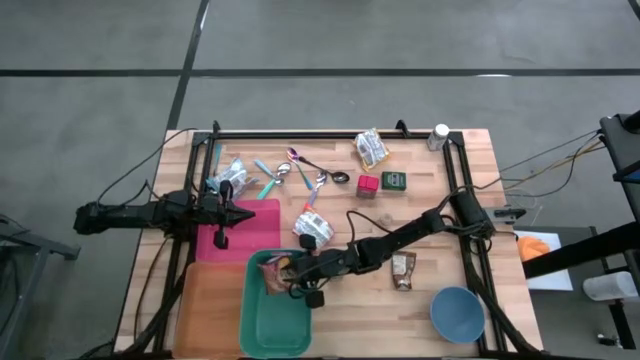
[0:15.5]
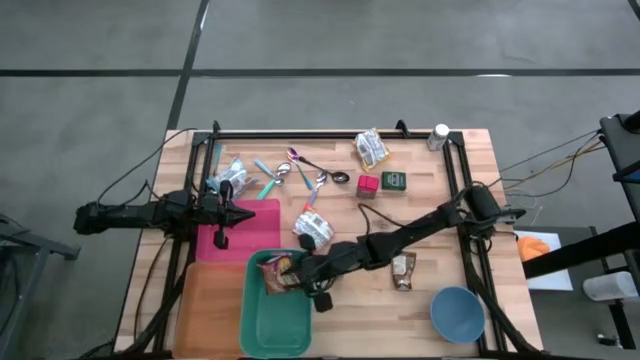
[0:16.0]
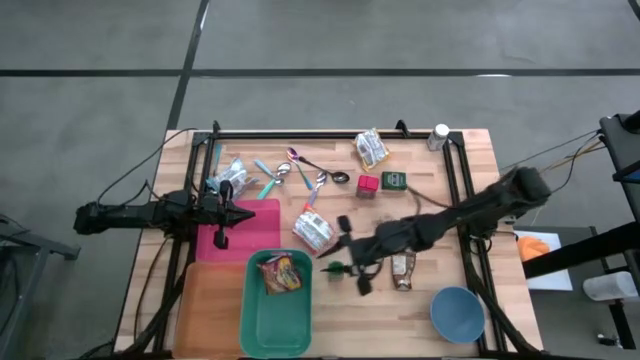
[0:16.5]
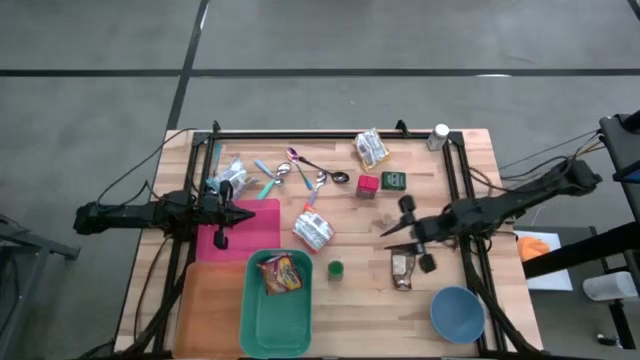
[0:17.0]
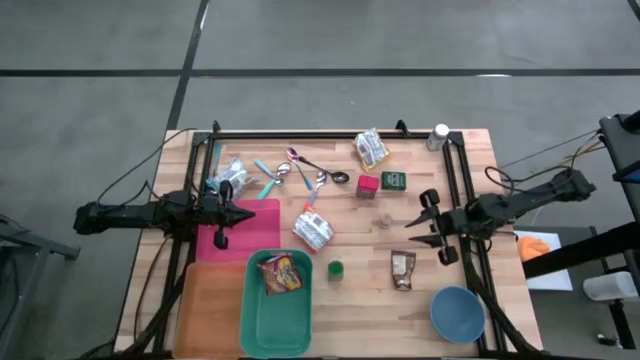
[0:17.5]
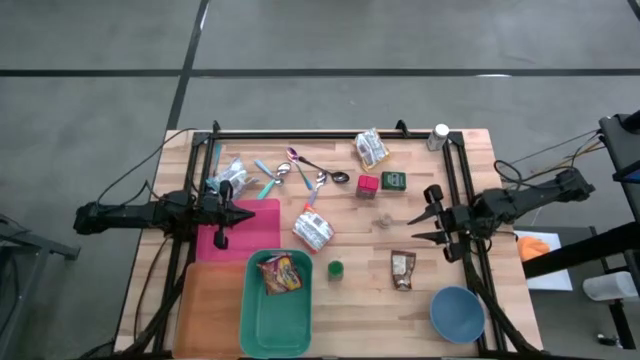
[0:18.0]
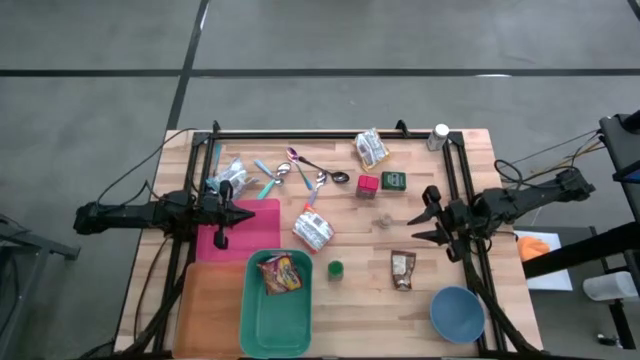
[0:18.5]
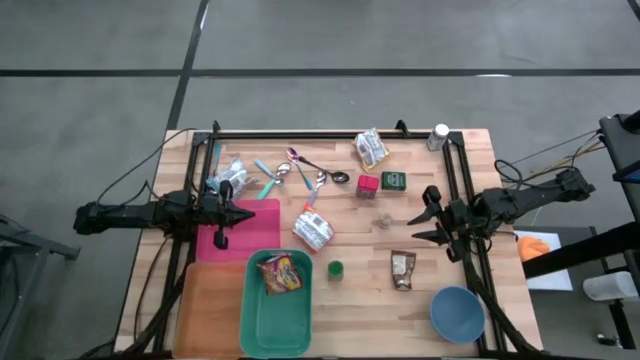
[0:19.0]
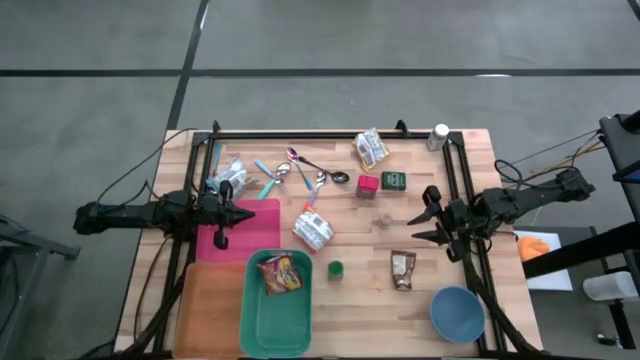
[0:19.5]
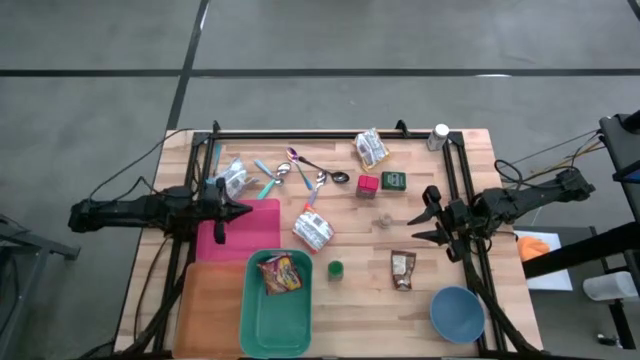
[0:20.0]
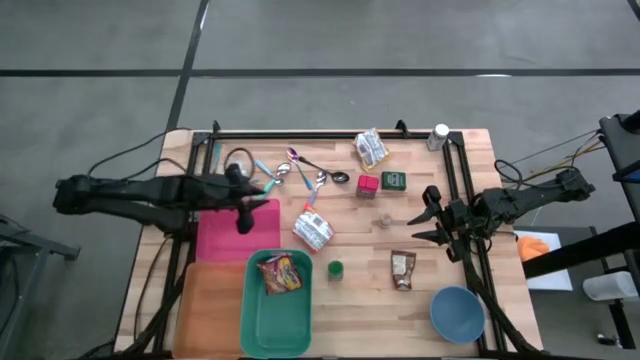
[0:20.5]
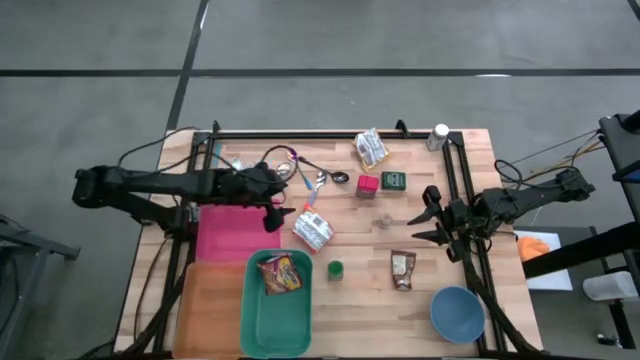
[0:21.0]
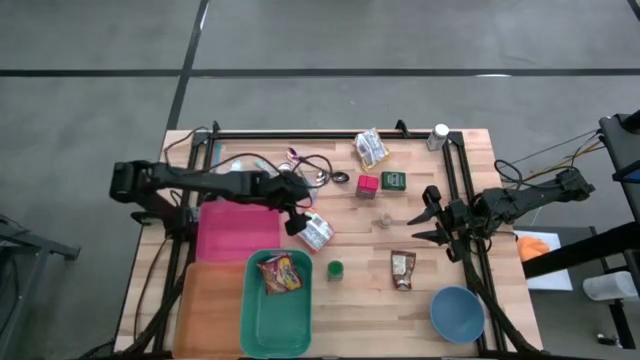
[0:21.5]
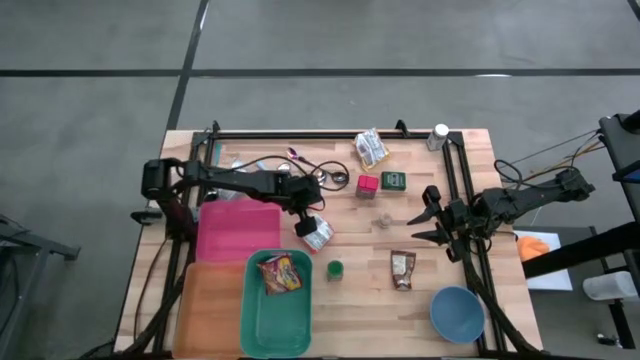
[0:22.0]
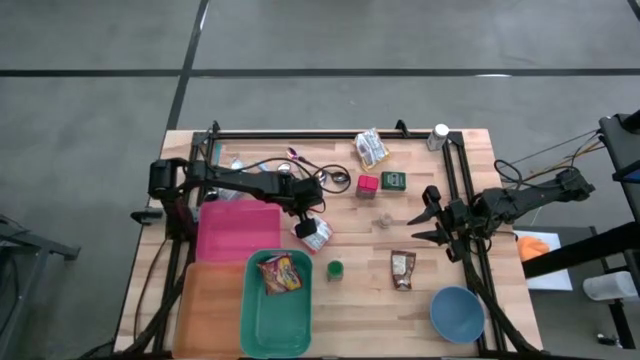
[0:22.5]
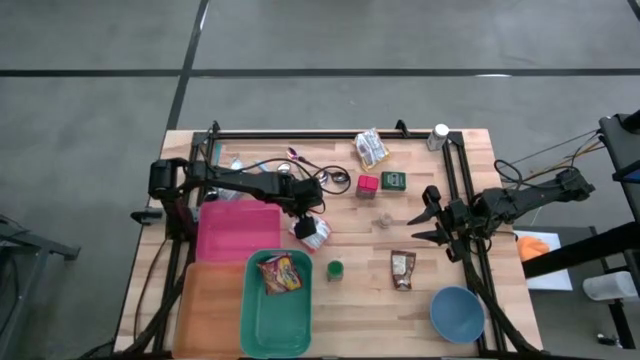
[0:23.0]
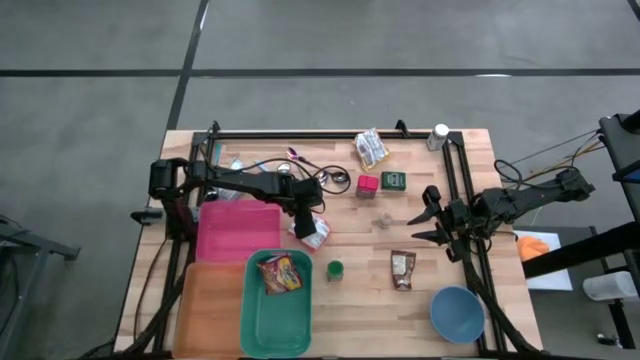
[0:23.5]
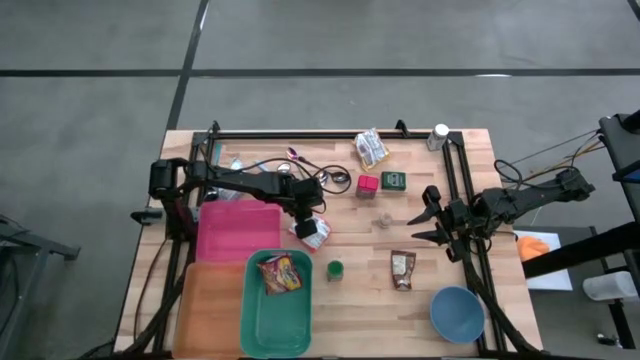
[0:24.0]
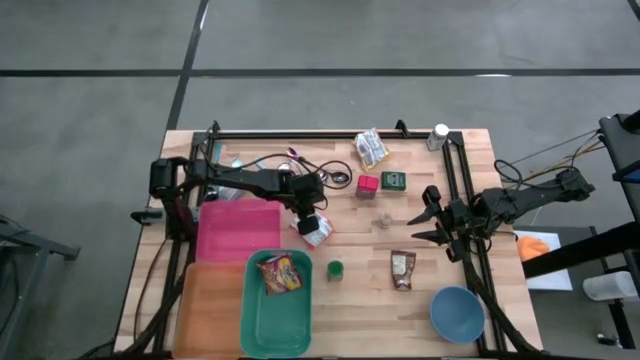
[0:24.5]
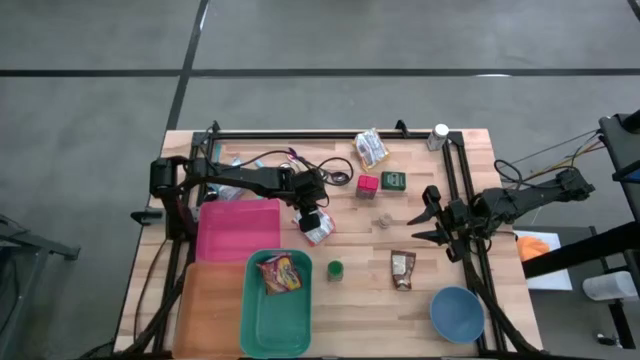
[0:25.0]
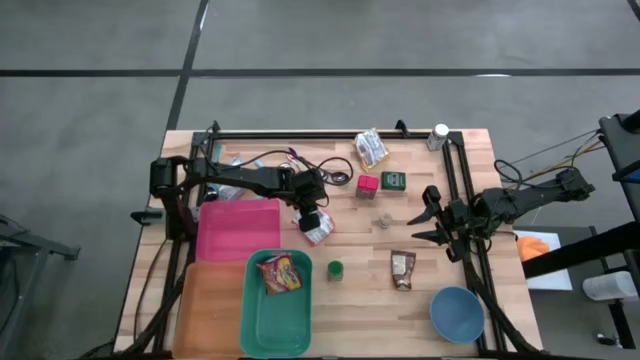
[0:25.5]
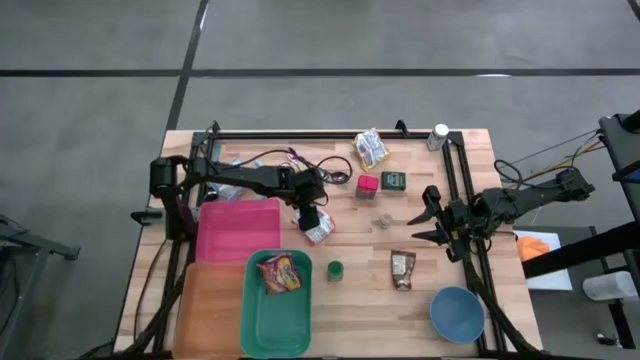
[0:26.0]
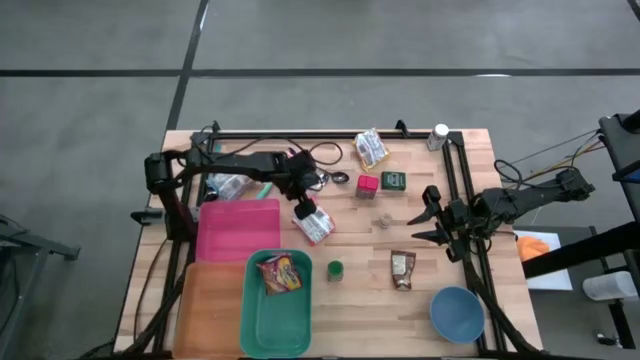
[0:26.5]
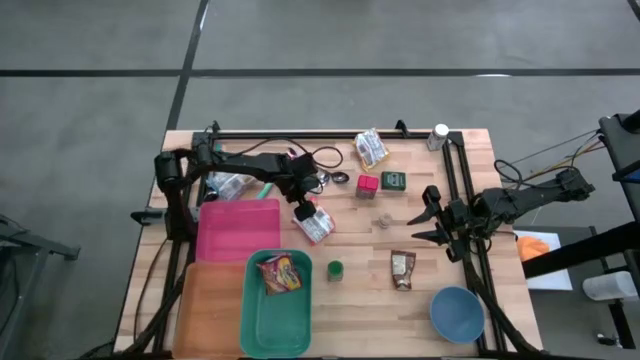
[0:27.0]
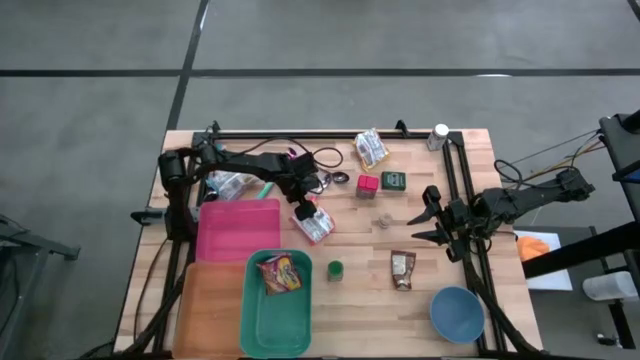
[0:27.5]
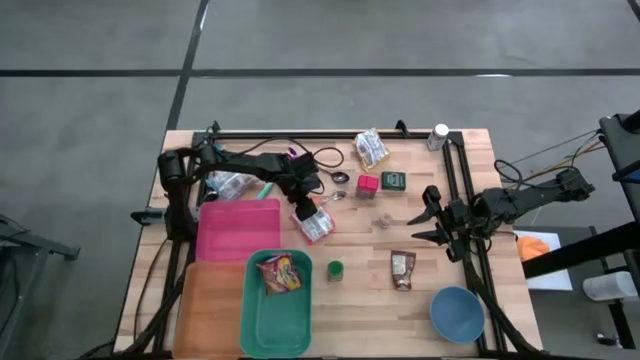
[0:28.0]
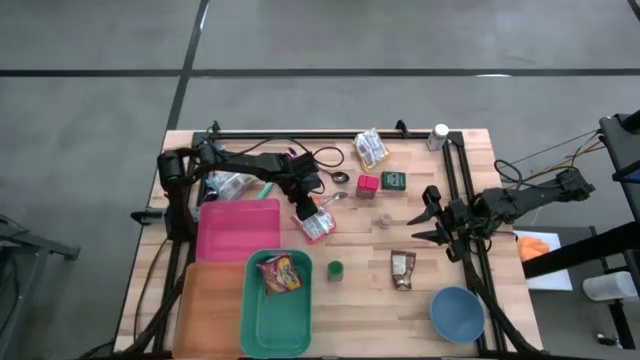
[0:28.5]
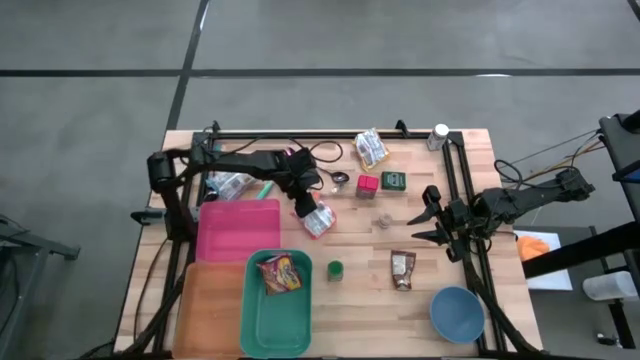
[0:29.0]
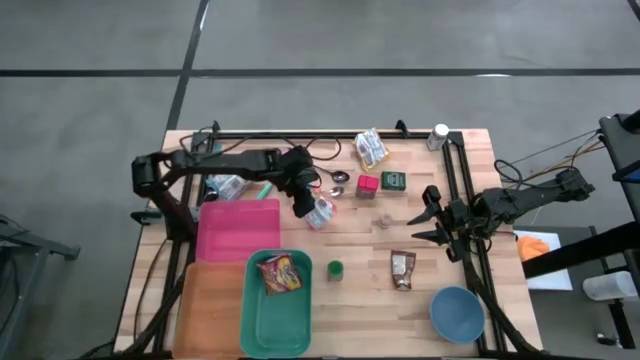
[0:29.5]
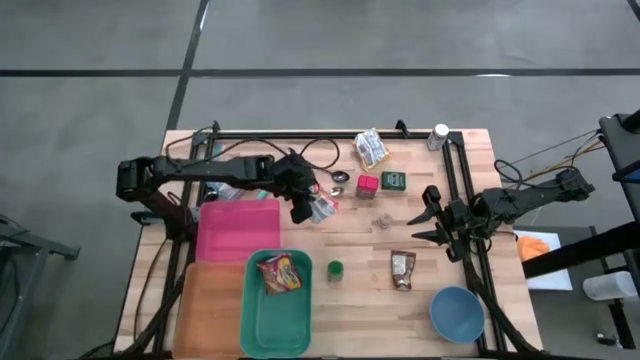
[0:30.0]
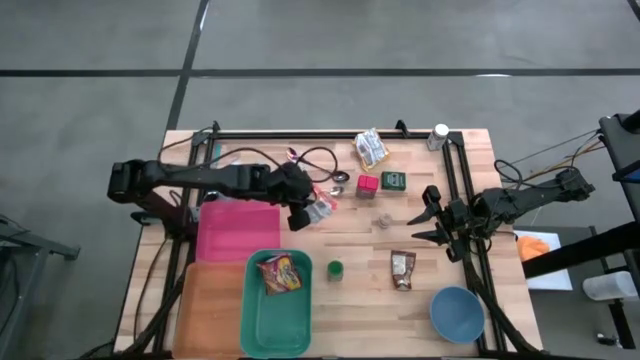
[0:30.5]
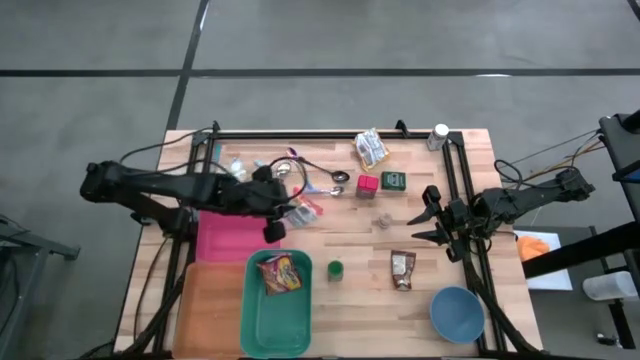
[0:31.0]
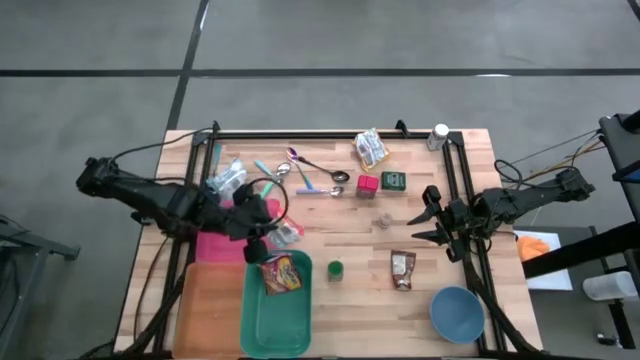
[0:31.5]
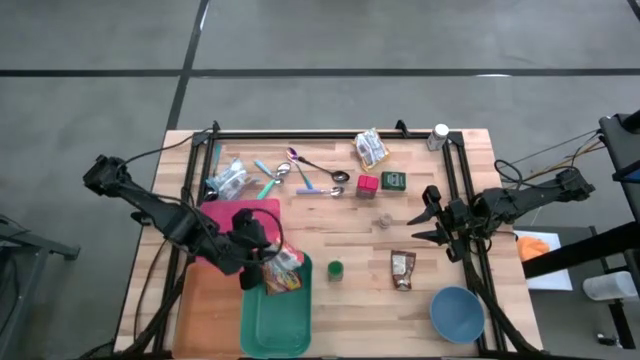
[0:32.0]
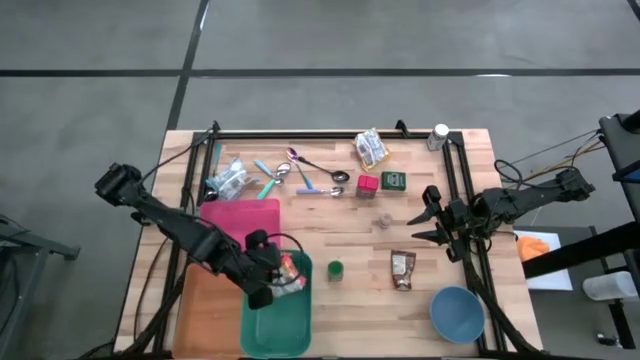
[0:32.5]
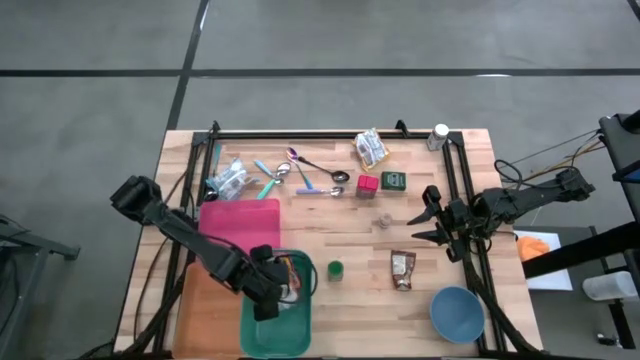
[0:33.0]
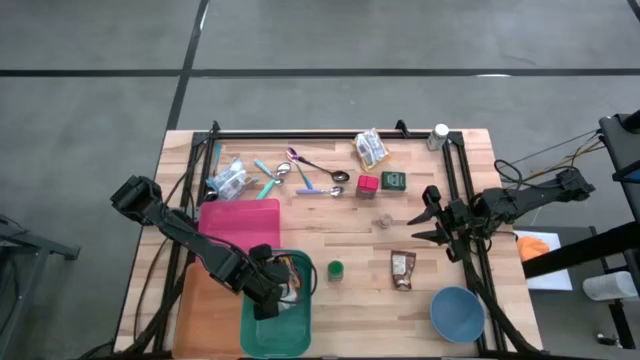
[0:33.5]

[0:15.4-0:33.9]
Put the orange noodle pack into the green bin
